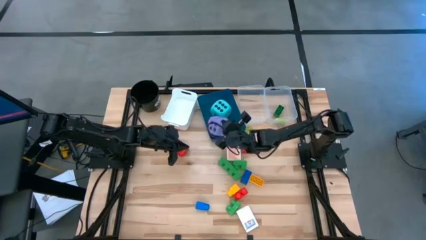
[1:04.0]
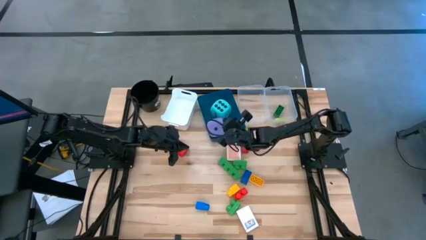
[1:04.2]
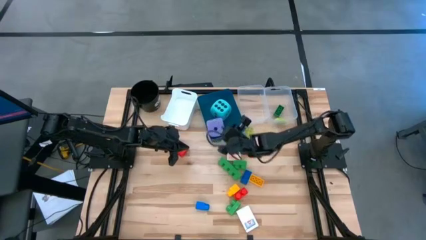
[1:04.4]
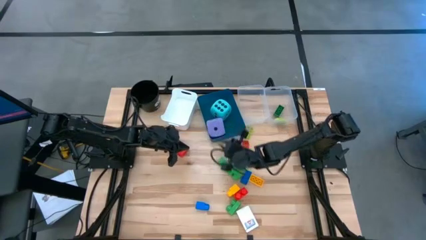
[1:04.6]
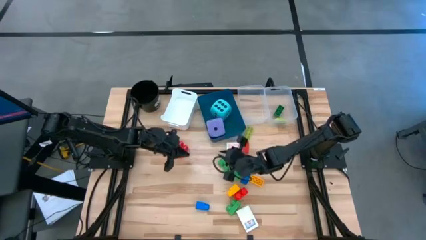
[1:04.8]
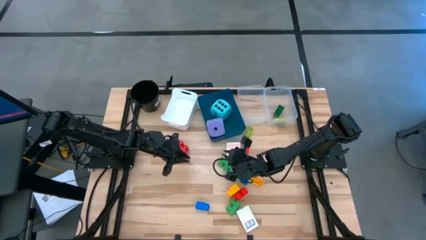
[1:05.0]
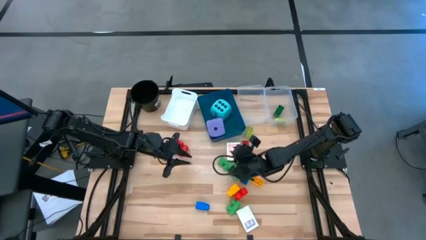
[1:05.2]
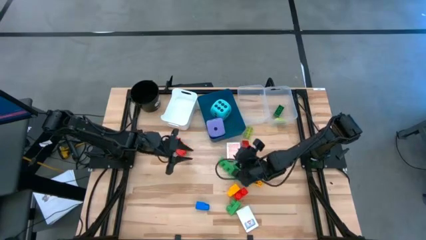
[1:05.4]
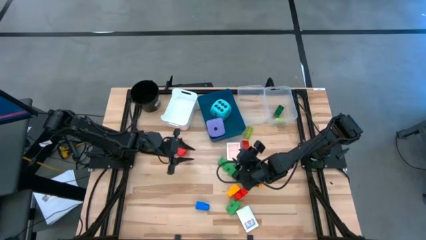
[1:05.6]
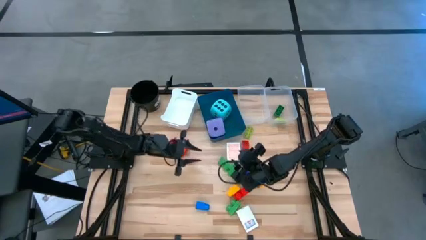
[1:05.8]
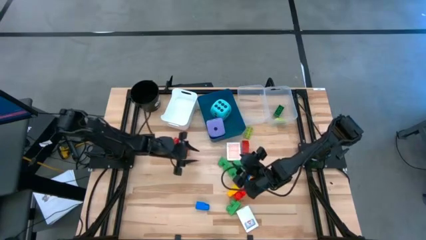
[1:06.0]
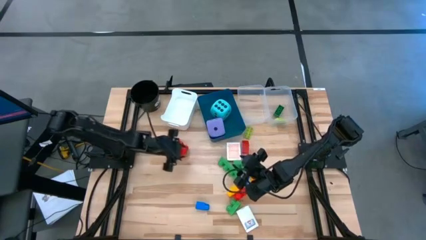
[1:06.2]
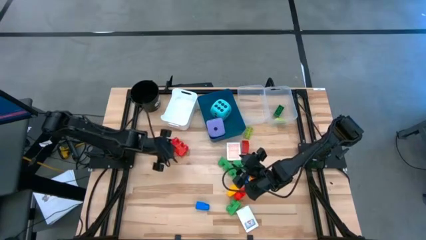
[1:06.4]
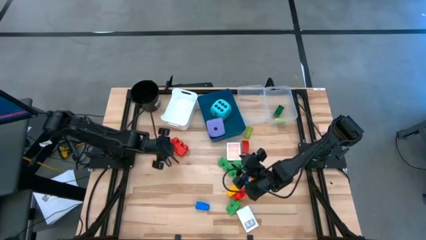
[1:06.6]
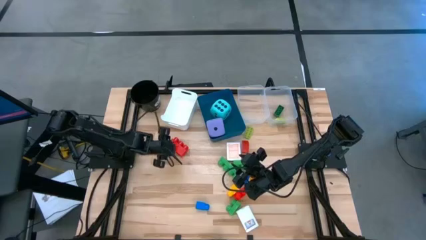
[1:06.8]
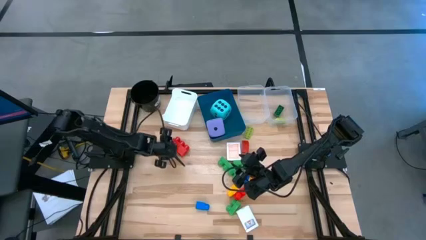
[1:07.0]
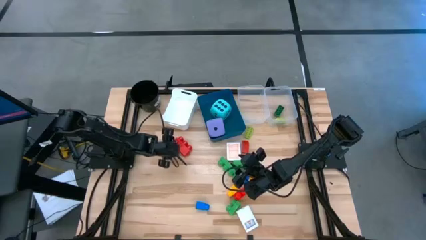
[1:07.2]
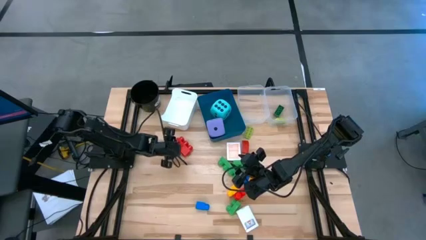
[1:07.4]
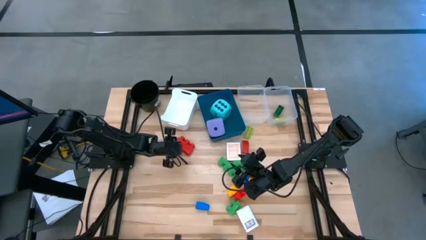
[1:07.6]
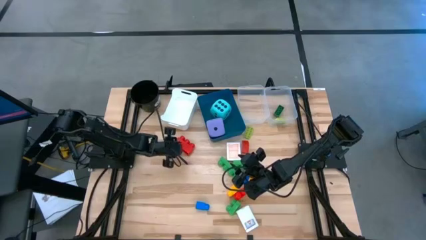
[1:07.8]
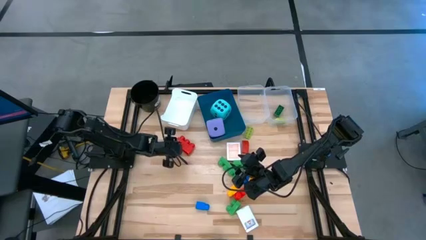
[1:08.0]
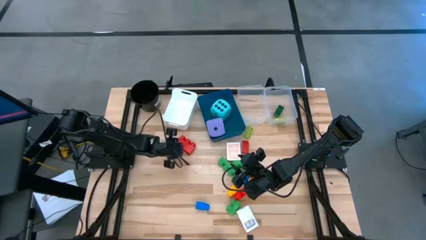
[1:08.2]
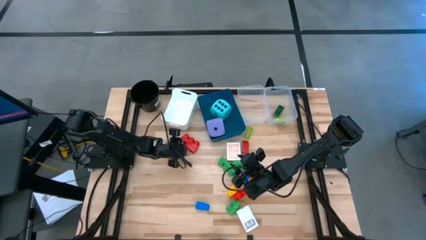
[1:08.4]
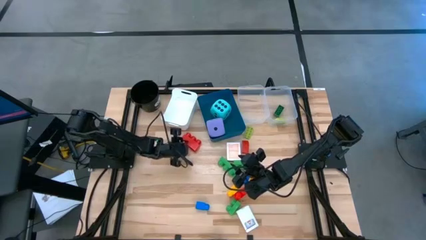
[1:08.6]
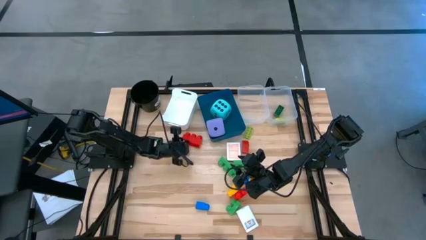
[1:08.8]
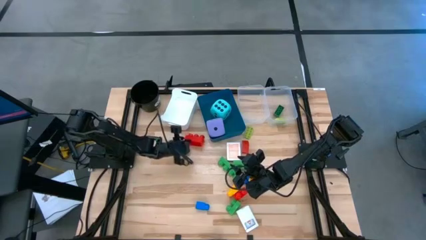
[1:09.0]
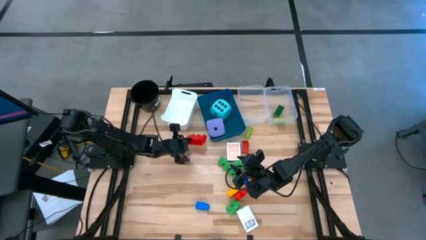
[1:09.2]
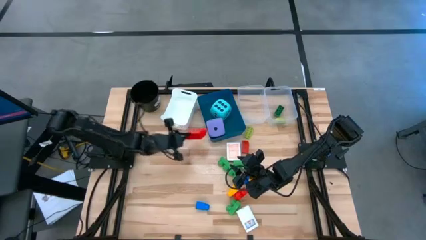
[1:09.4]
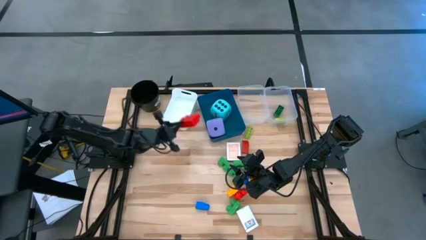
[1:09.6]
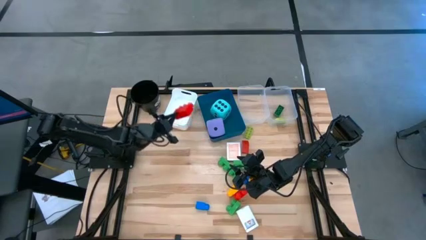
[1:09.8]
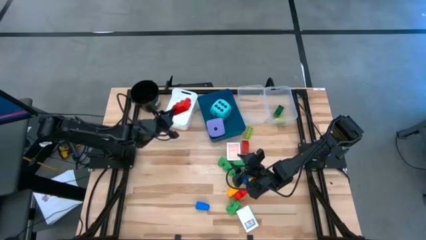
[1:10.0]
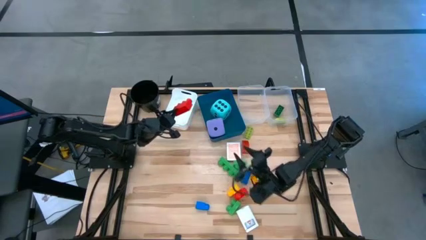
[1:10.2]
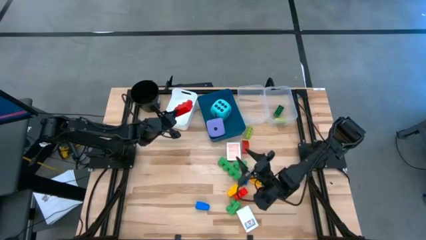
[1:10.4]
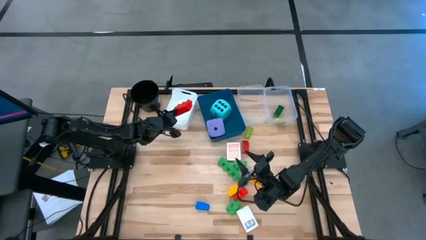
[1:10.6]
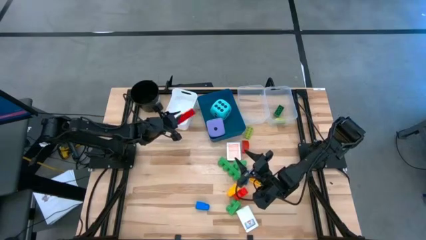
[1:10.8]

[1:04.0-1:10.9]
Task: Pick & Place Toys
Put the top large red game piece into the white bin

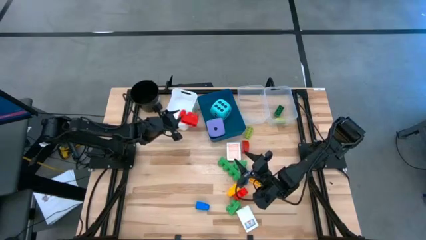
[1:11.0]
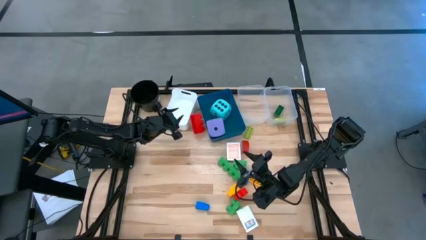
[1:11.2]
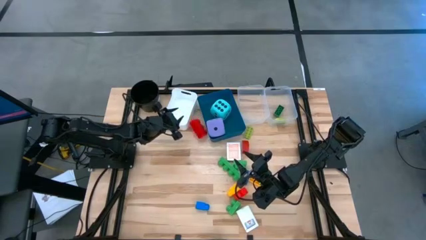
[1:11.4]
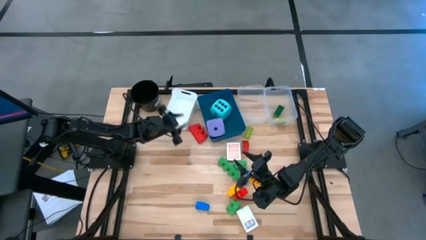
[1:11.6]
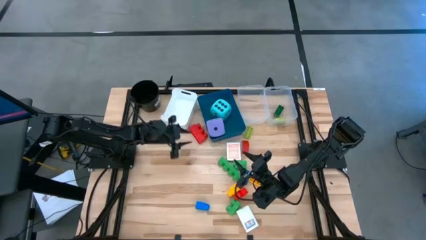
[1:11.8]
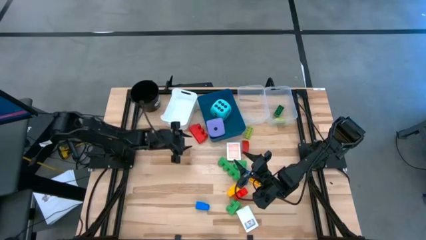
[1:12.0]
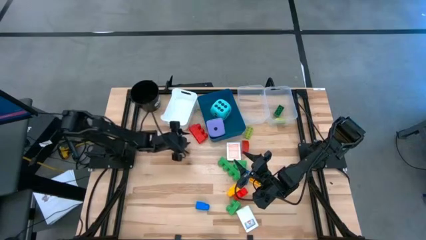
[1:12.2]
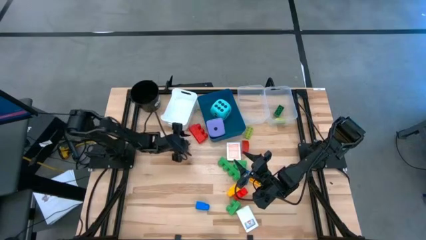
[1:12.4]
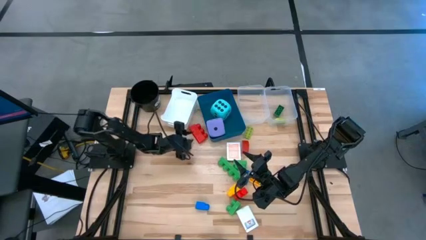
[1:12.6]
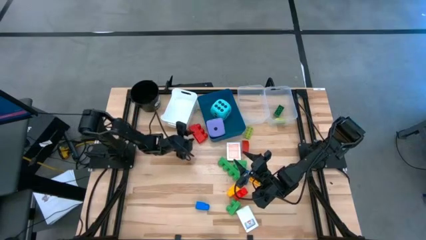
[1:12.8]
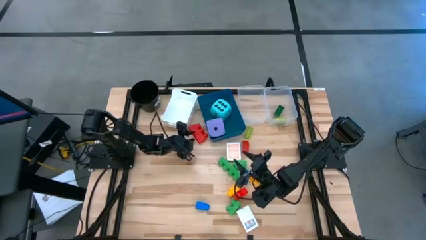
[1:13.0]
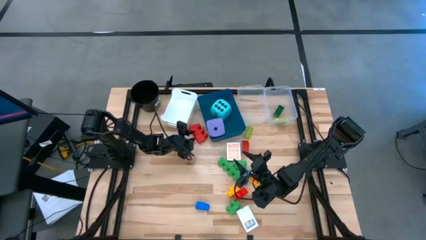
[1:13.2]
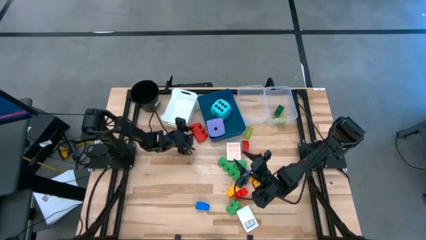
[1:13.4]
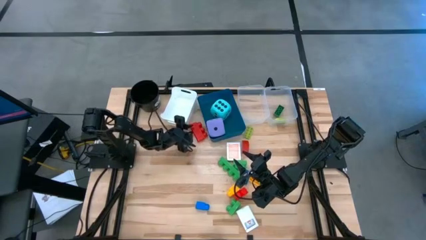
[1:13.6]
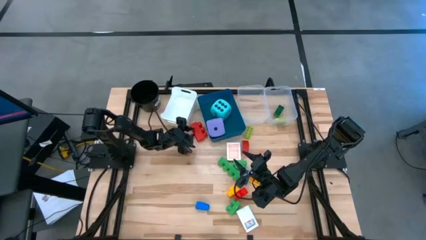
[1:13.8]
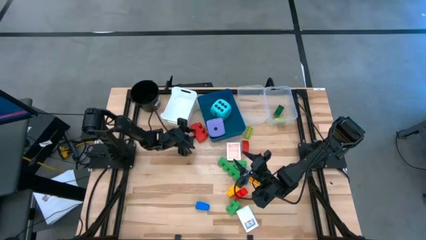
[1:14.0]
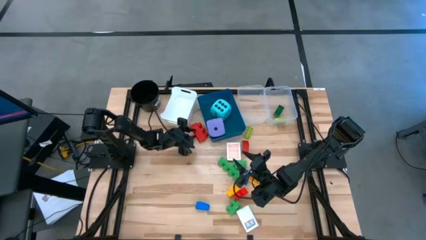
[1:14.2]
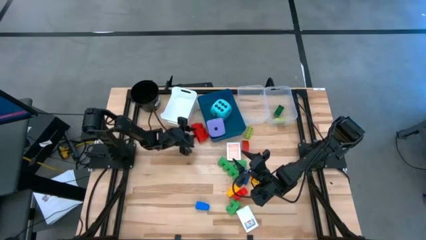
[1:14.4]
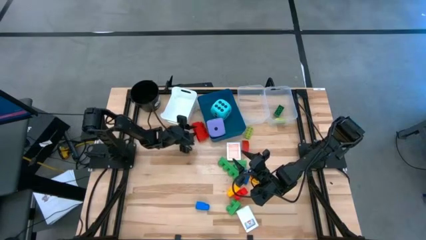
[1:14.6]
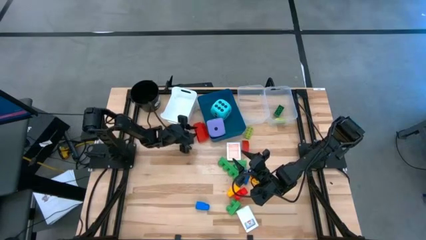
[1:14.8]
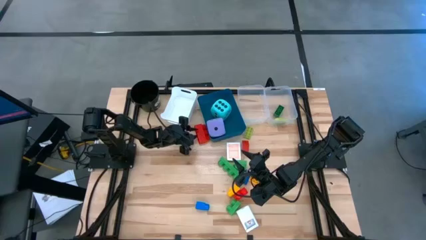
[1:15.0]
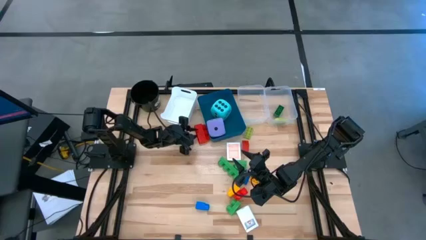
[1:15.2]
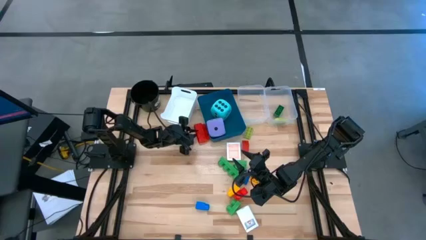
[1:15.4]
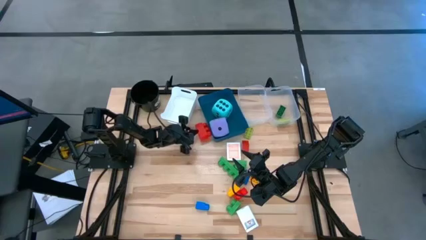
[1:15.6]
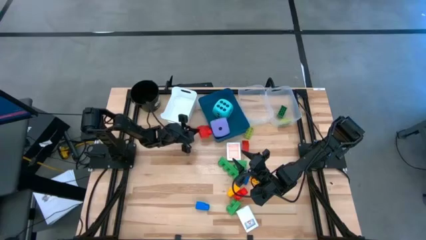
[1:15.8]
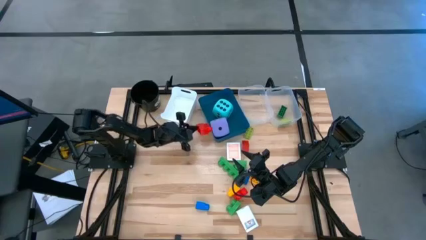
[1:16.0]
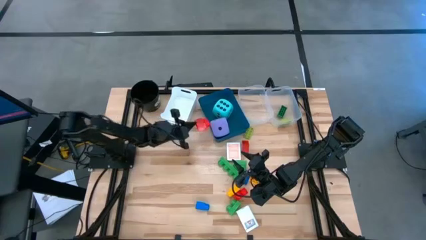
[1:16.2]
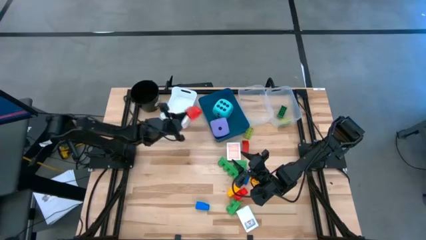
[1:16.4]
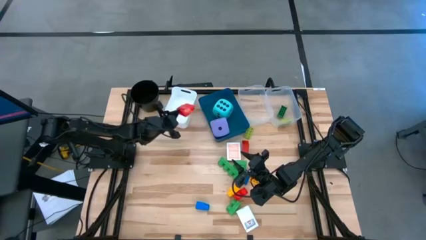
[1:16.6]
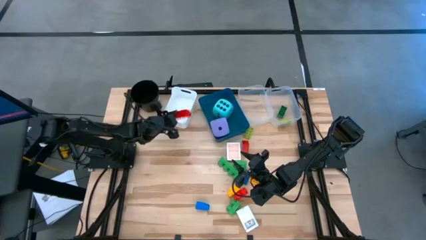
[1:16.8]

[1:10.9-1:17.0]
Put the top large red game piece into the white bin

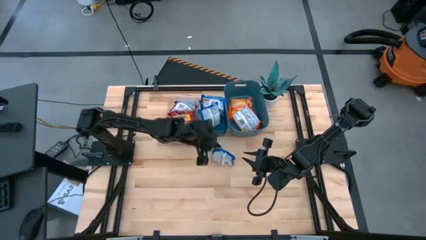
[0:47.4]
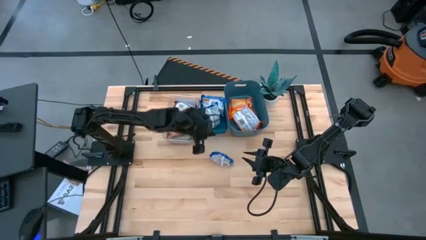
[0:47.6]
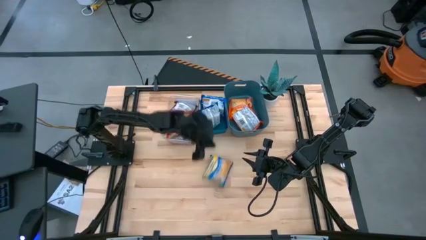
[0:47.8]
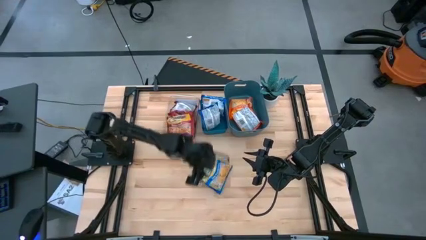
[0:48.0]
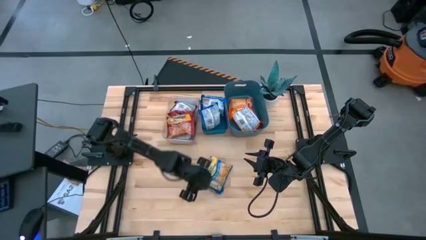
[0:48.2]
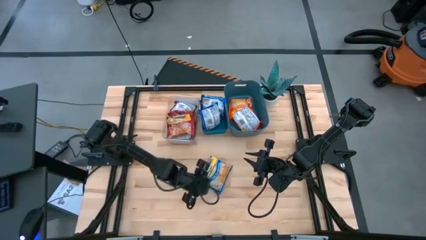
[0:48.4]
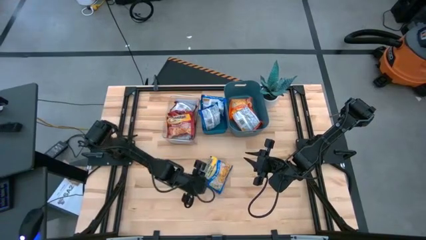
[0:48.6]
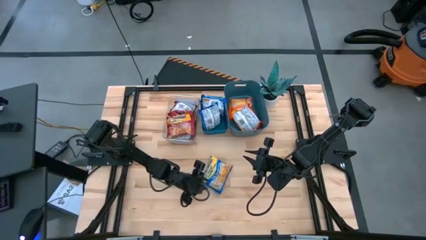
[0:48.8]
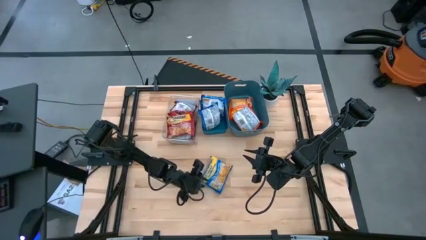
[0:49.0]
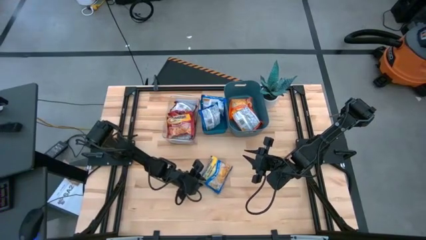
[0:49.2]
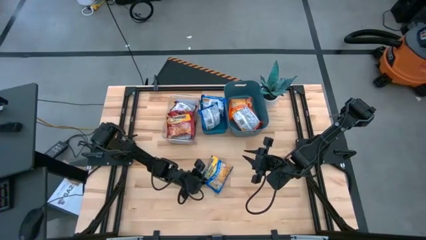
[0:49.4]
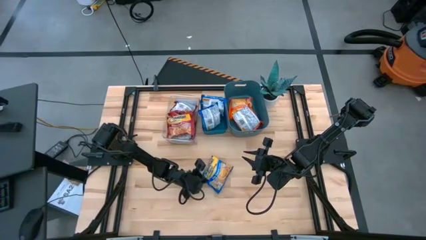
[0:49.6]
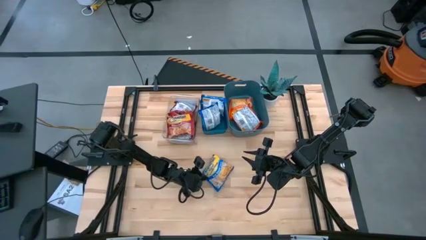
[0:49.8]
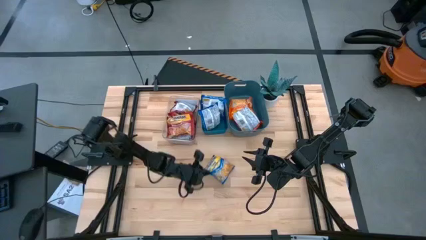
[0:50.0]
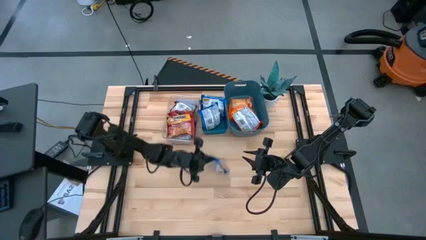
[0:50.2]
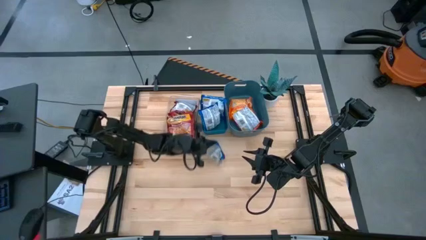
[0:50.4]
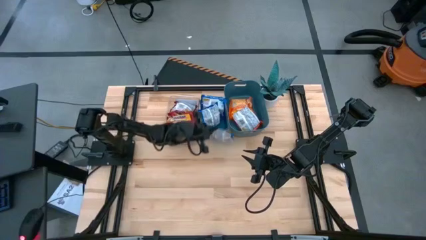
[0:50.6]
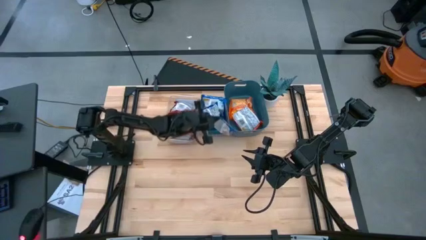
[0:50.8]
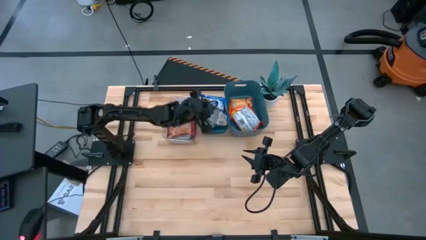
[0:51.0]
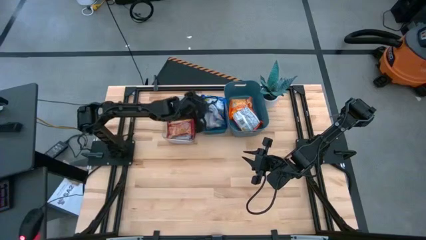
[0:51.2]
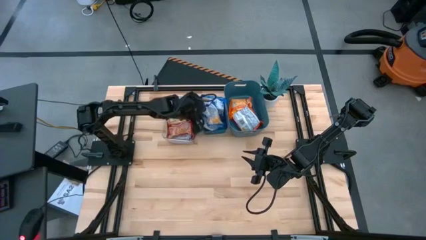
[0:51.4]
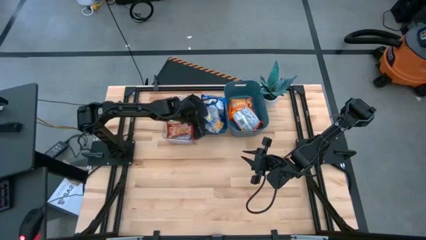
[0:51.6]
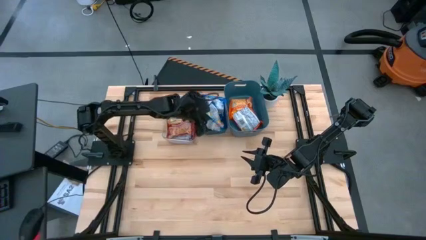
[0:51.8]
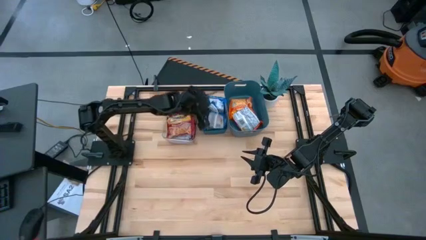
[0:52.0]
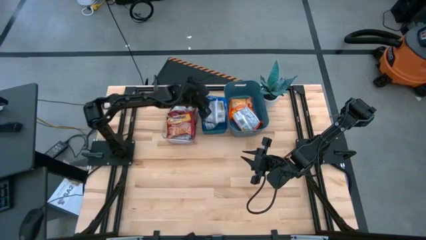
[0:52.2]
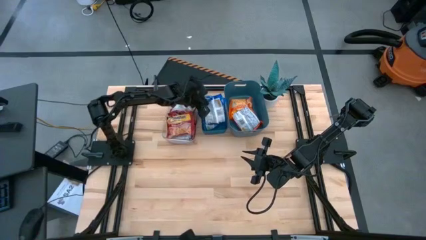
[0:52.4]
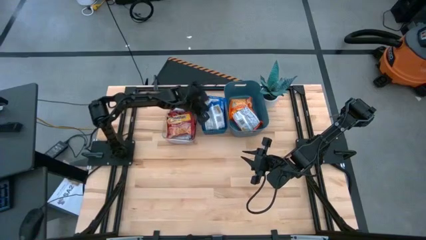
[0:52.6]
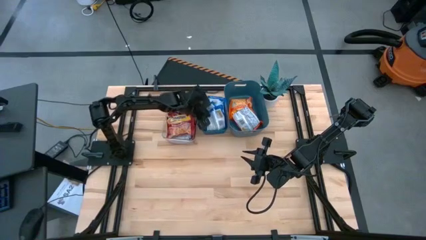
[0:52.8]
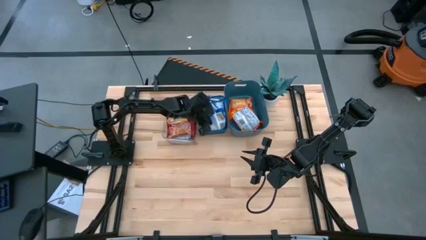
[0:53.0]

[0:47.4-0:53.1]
Task: Sort Maruchan noodles
Put the blue noodle pack into the blue bin
